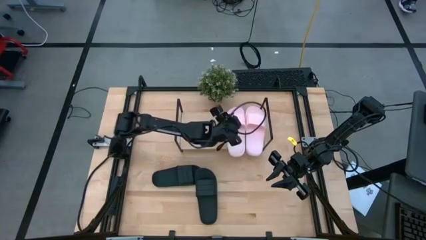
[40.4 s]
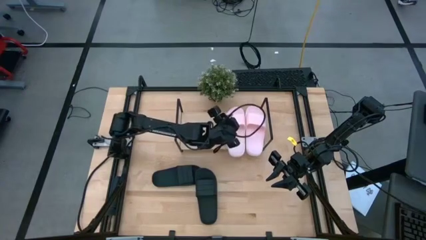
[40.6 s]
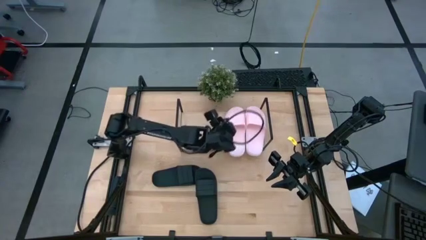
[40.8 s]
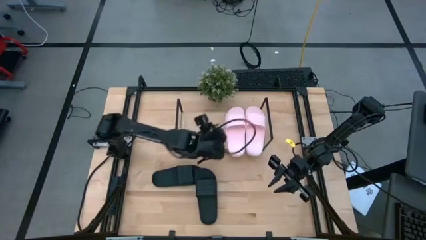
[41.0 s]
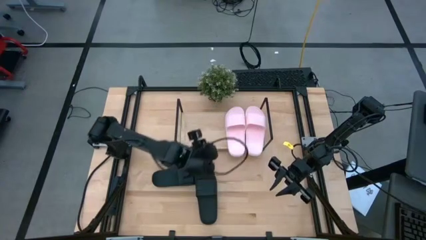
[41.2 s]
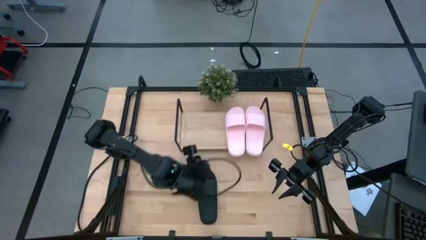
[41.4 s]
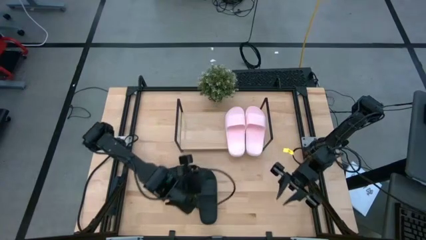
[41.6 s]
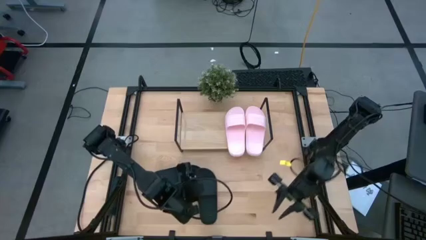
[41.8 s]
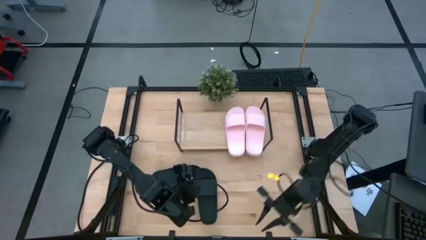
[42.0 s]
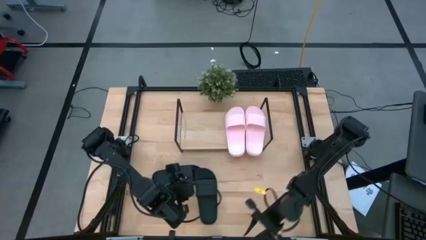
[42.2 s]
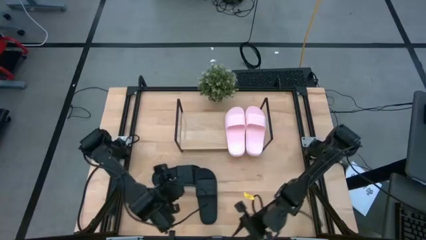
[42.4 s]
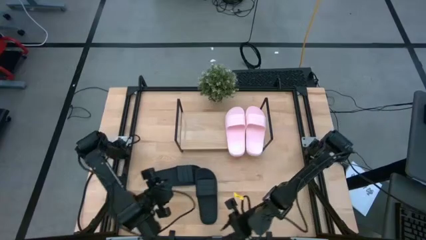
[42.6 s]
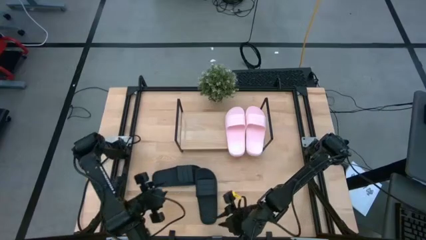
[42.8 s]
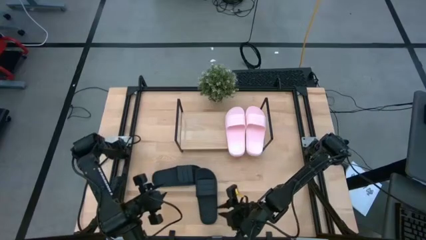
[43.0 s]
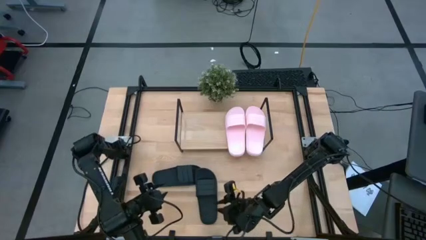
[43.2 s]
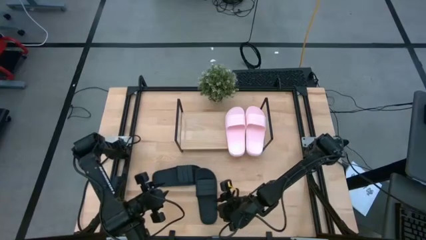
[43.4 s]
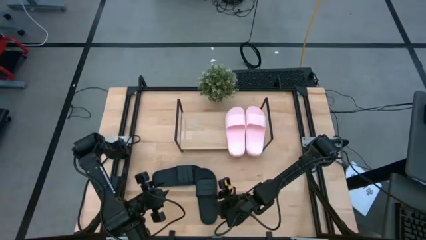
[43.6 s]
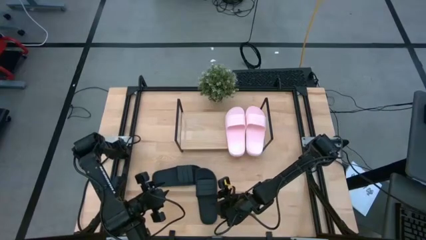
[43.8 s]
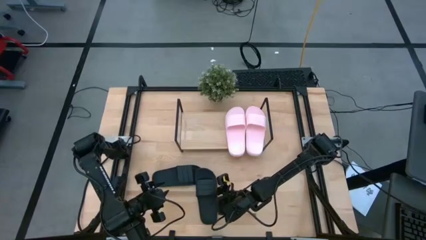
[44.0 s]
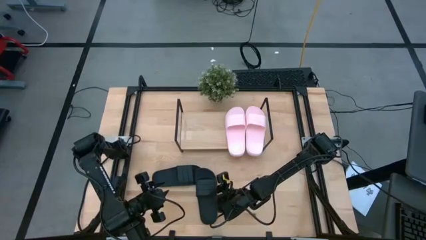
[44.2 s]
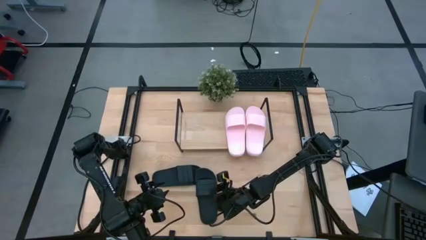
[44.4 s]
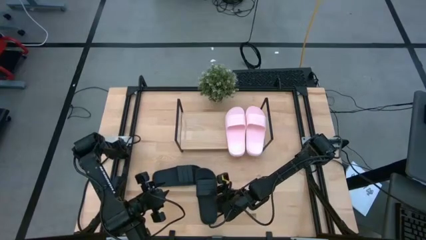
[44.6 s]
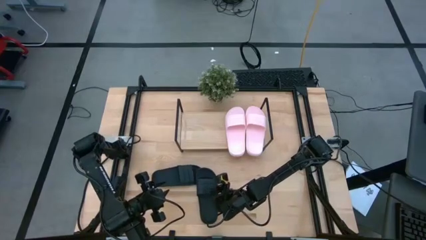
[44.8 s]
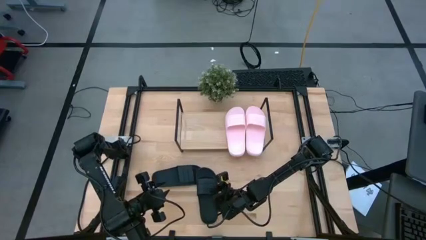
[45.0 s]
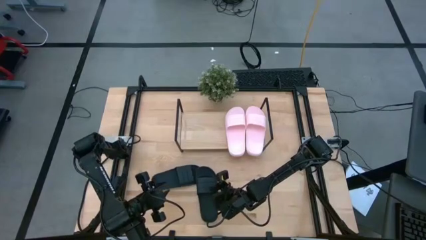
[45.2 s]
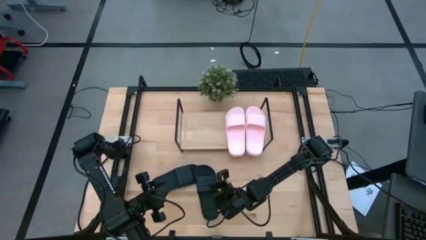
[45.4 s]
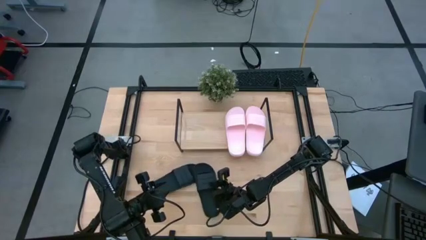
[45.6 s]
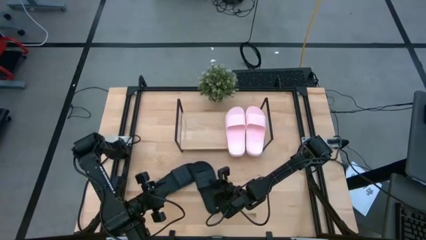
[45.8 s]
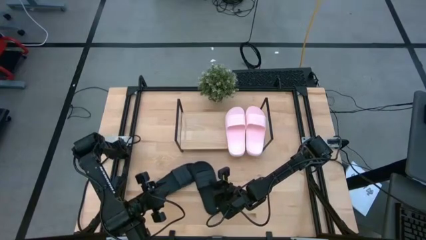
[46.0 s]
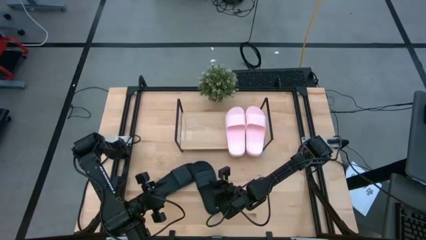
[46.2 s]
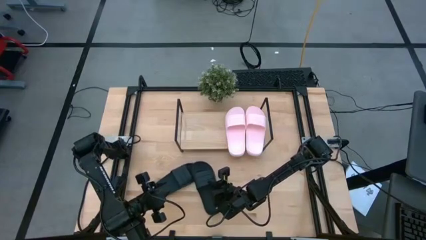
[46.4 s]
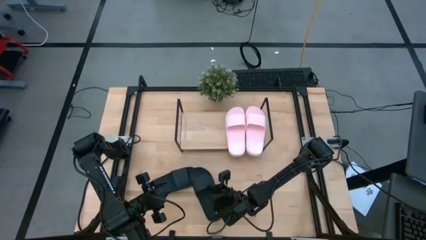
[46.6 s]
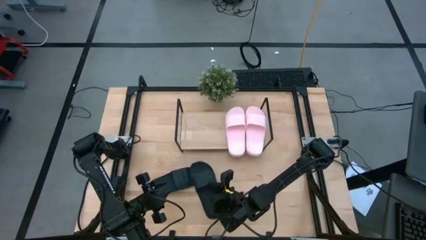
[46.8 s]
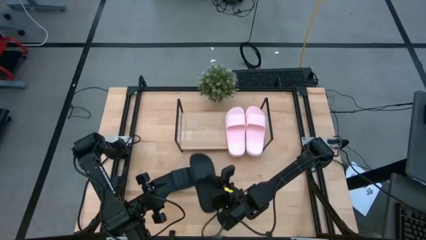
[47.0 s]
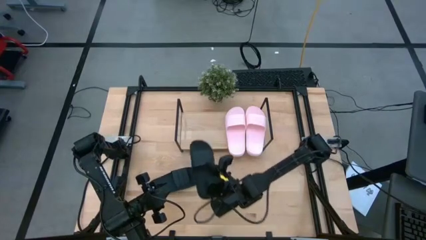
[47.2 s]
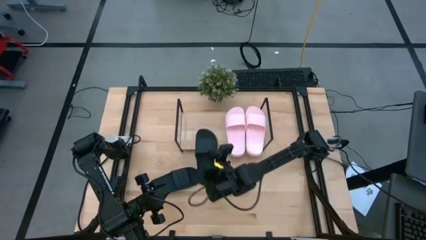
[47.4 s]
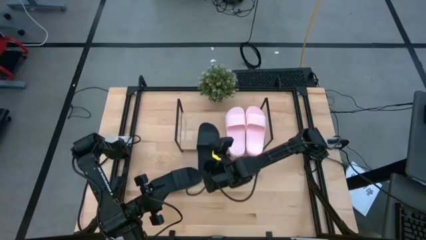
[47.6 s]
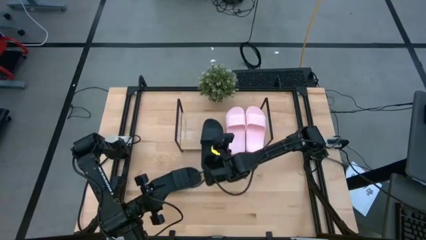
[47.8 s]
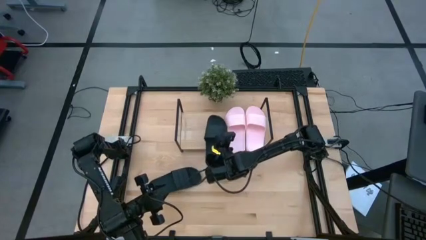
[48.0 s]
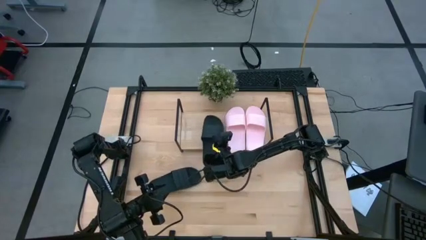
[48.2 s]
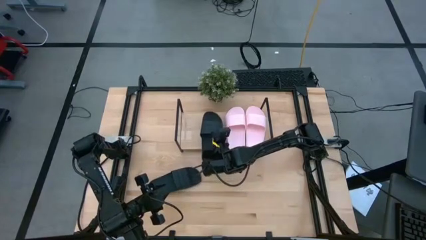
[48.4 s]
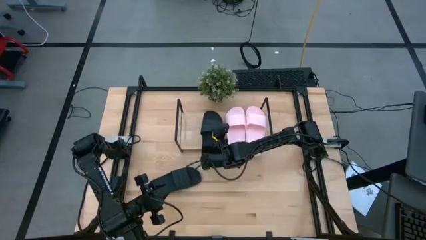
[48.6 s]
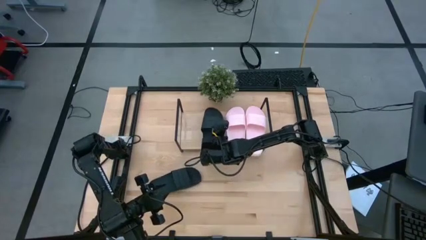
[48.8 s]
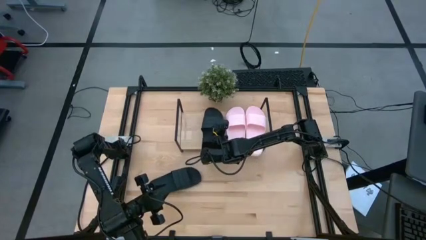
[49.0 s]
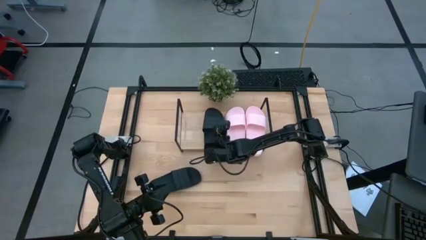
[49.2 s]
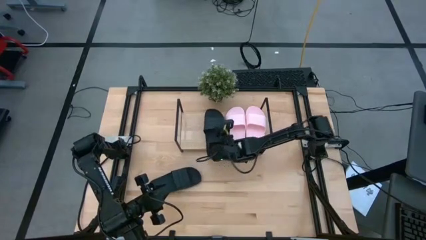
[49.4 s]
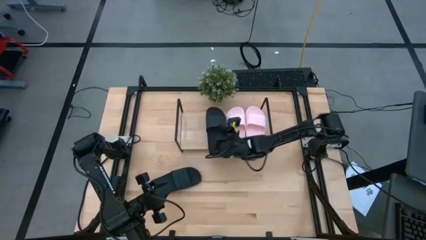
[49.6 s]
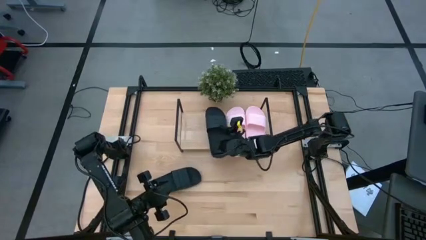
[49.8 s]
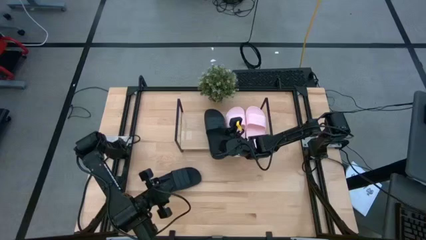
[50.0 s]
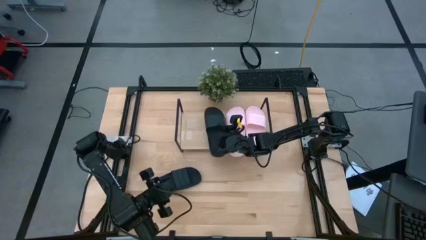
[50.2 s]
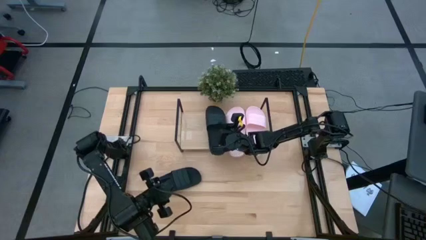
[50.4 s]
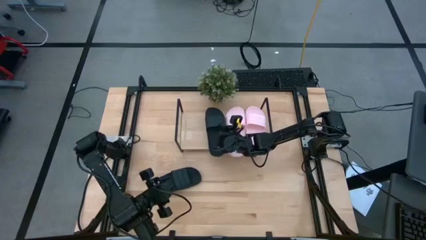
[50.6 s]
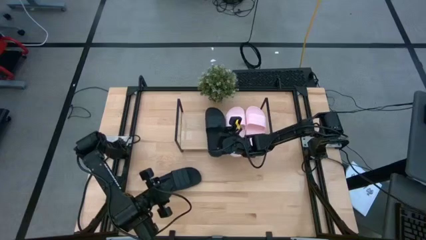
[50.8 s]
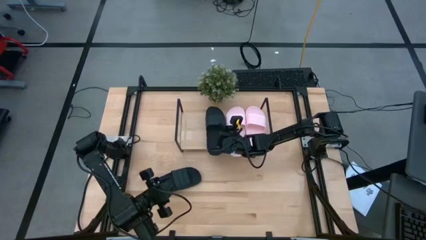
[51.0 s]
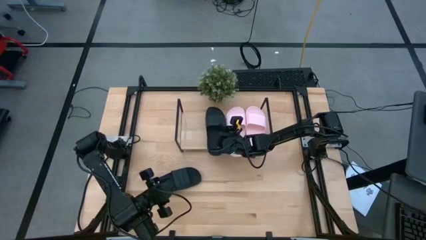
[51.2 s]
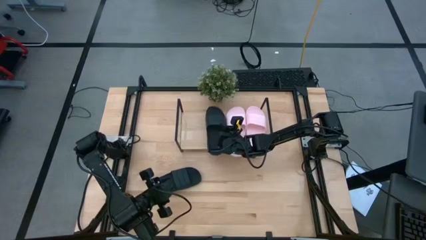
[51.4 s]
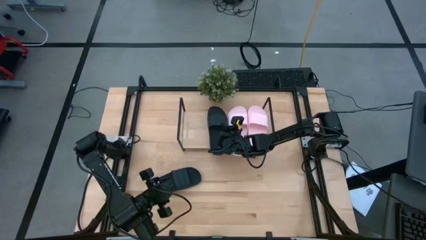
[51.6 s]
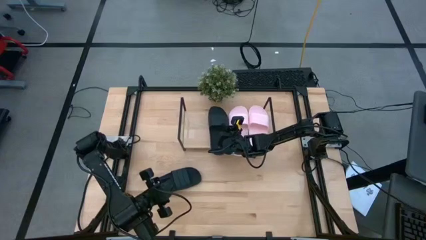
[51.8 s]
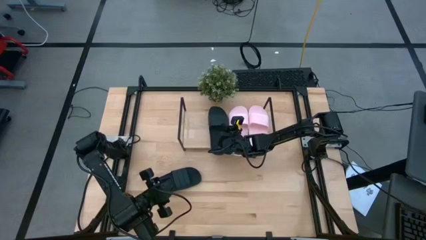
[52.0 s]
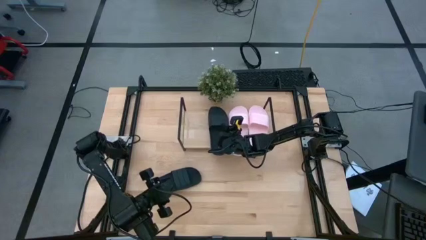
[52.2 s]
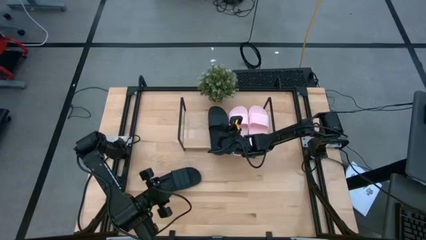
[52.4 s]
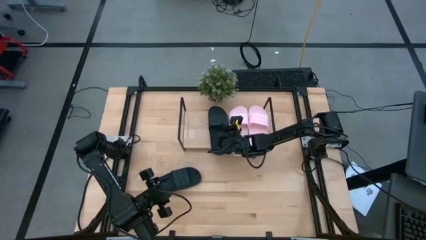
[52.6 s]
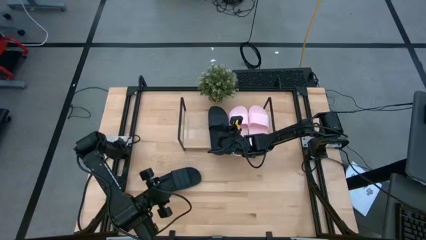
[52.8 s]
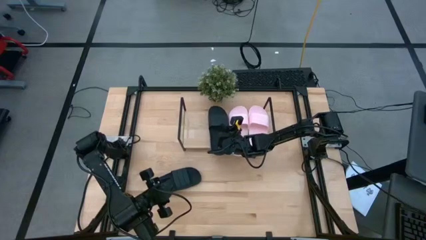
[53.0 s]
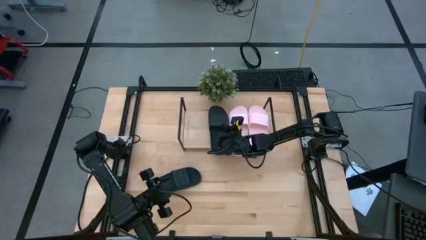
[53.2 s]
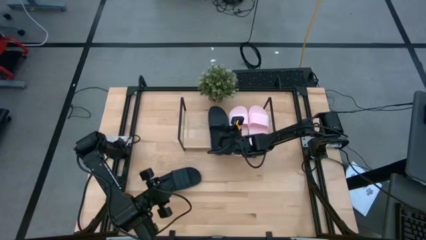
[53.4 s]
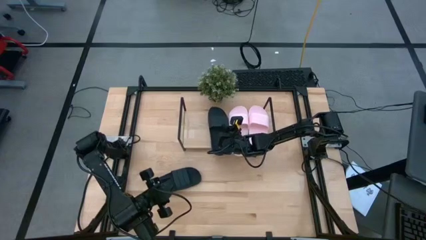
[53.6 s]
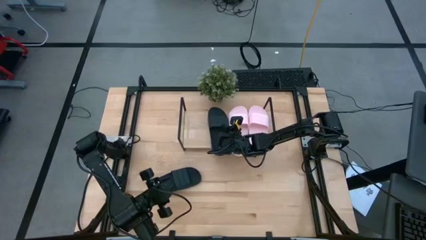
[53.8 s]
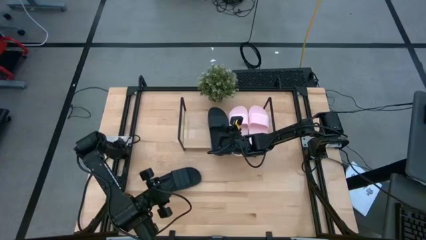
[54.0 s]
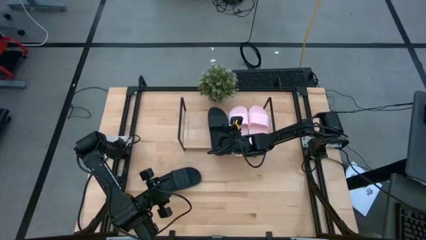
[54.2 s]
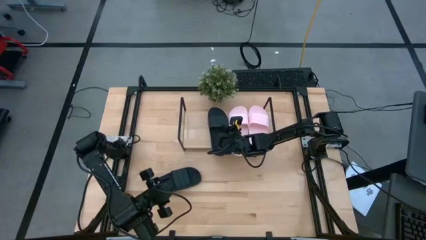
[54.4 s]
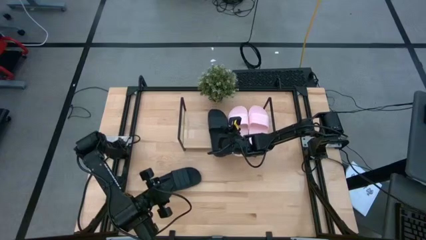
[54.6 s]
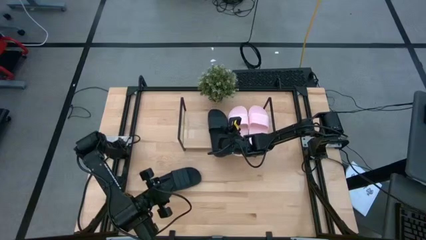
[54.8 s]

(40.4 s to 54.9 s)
Task: Pick and place slides into the shelf
Put the right black slides on the shelf

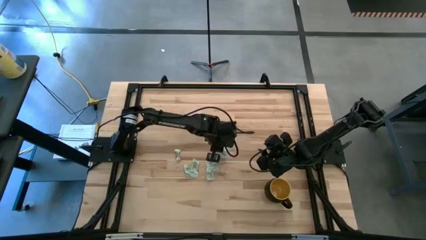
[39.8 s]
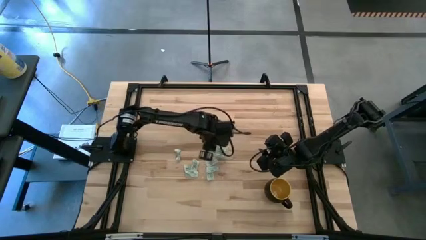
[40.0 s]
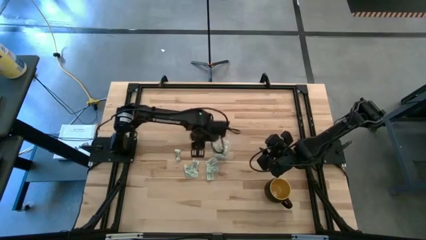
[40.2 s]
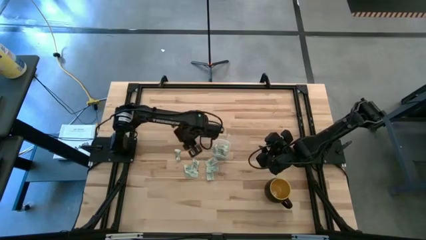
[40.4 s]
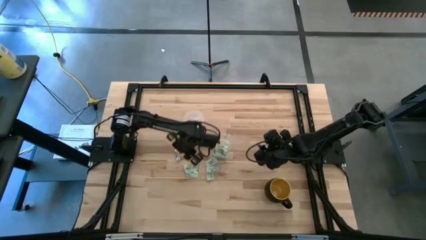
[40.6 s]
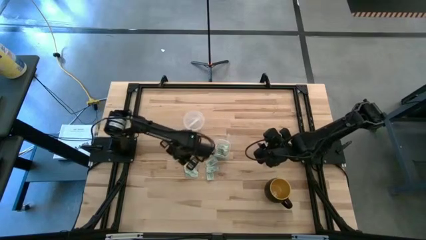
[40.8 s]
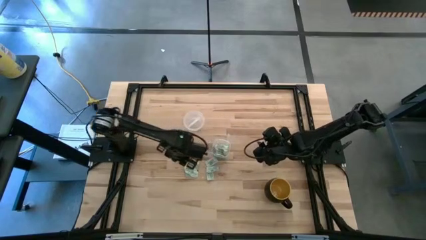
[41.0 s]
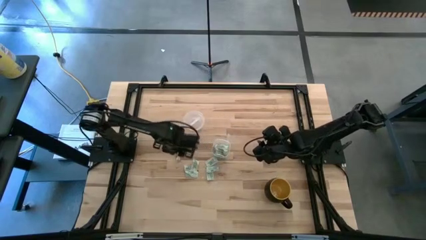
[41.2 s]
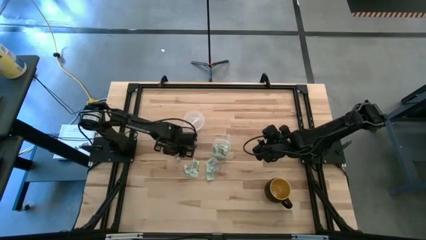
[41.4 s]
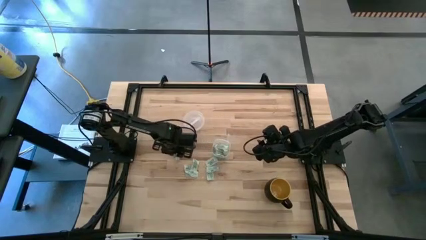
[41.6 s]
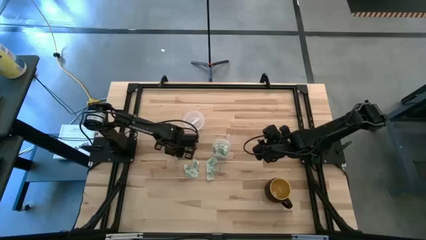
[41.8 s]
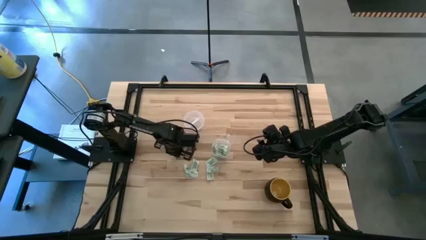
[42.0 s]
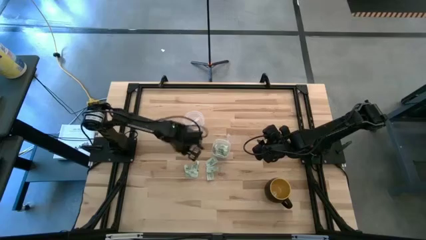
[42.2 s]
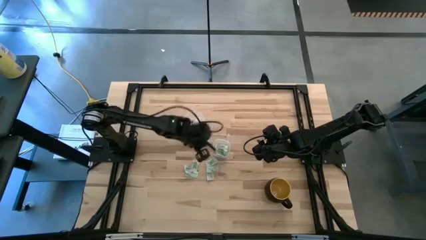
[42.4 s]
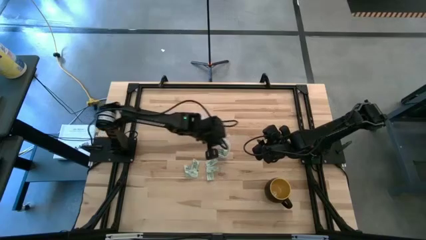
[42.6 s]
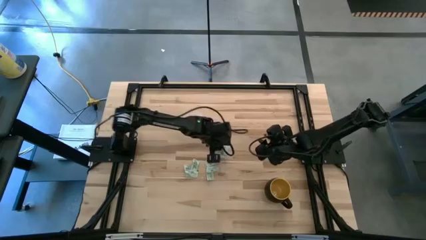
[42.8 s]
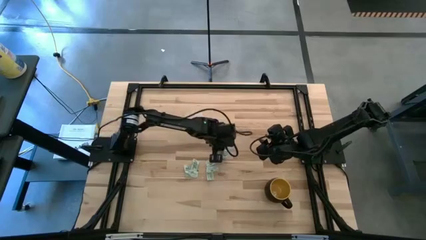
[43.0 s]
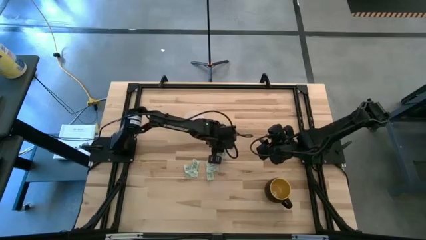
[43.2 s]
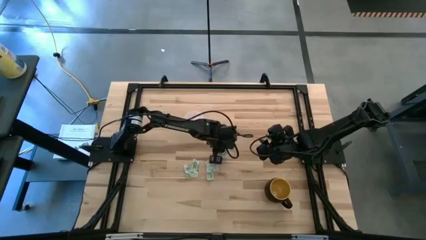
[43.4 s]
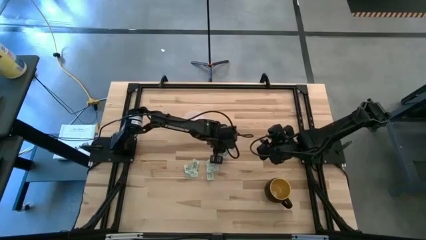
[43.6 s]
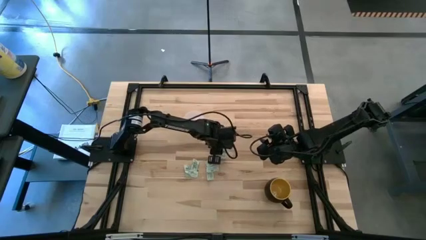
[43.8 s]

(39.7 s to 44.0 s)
Task: Pick and place items into bin
Put the light green stevia packet into the transparent bin
